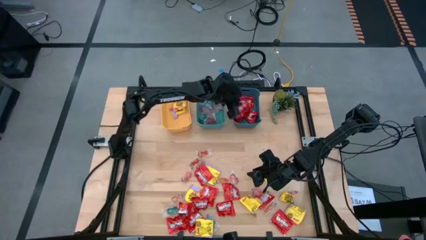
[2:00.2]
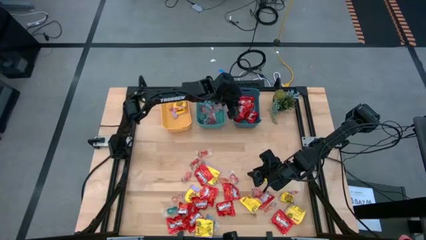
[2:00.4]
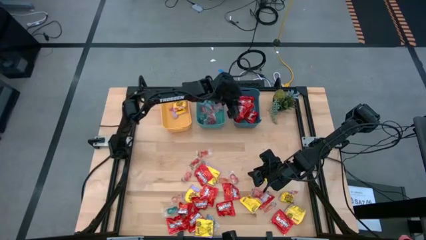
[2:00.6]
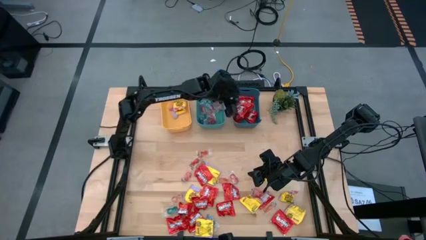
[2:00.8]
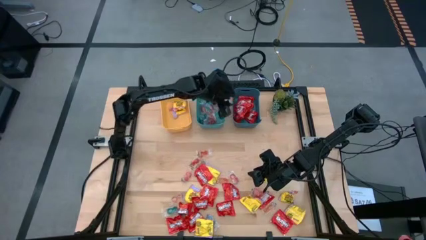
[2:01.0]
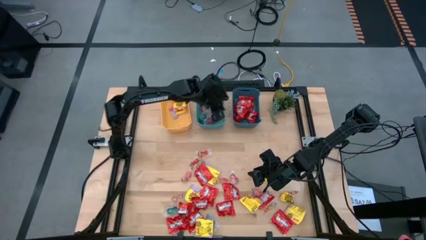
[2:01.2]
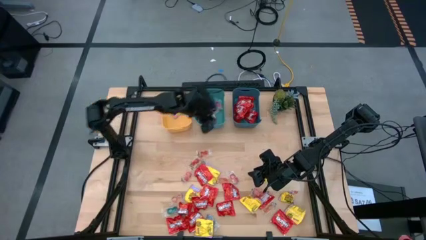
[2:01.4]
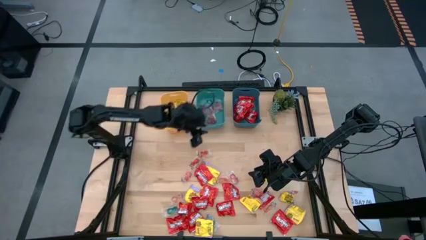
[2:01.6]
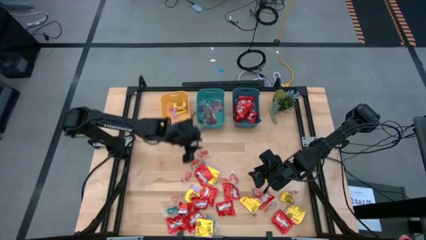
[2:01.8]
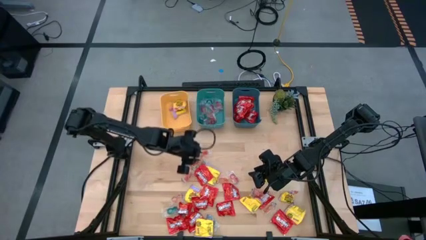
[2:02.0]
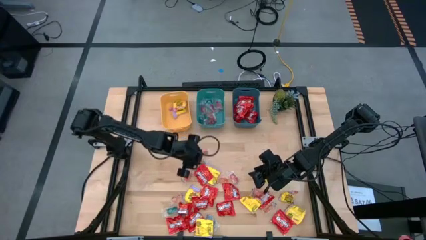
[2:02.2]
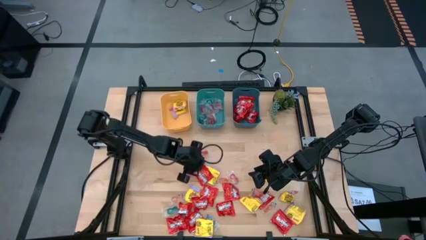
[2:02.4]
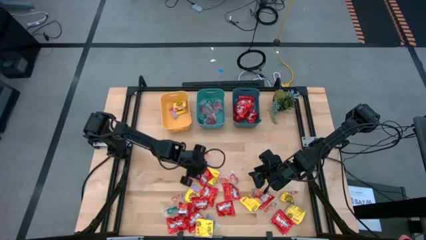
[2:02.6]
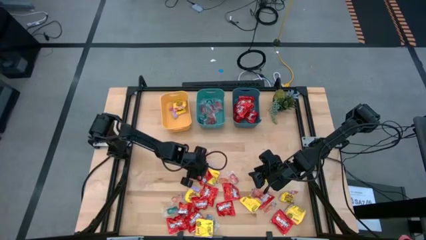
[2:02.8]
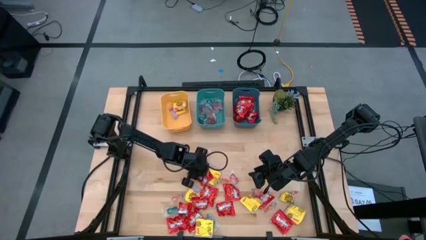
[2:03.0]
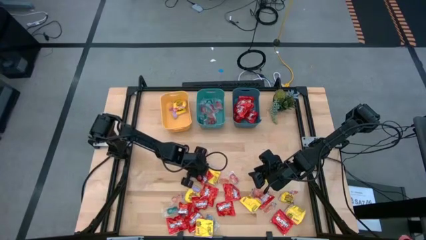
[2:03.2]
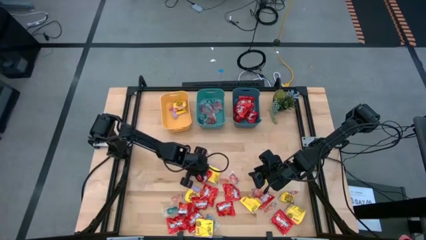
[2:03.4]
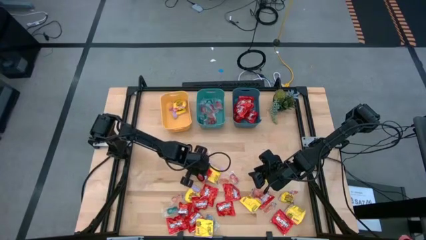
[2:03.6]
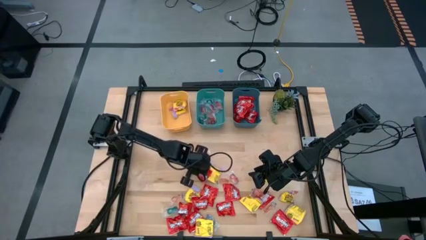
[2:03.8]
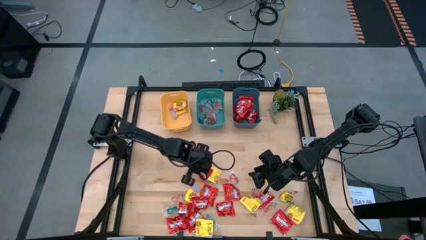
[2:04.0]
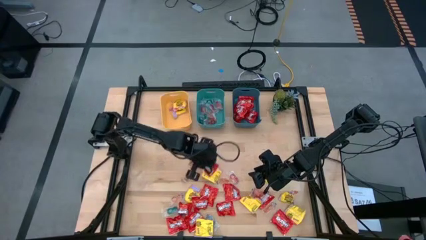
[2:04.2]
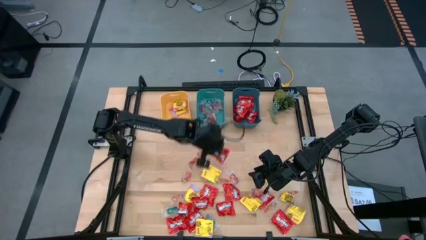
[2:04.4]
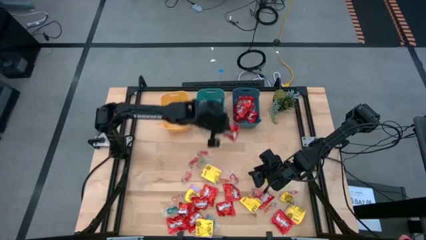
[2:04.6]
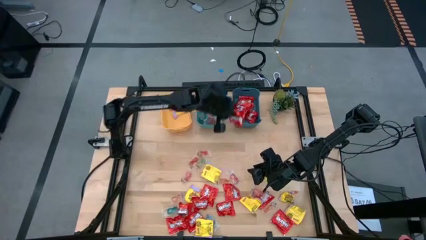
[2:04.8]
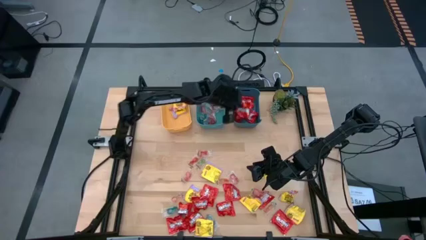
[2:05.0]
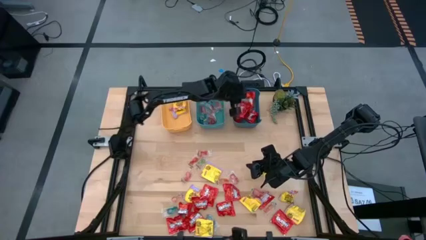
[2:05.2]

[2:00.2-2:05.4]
Task: Sort candy
Put the red candy into the blue bin

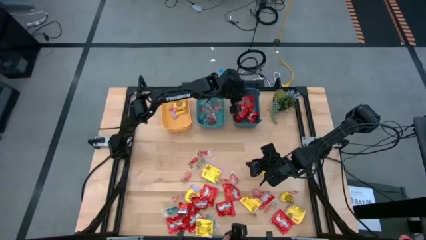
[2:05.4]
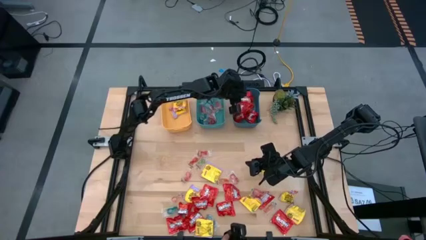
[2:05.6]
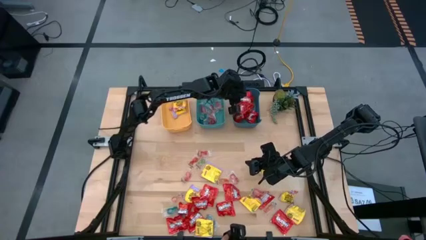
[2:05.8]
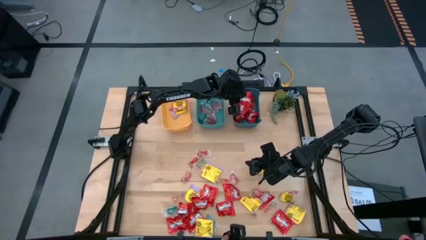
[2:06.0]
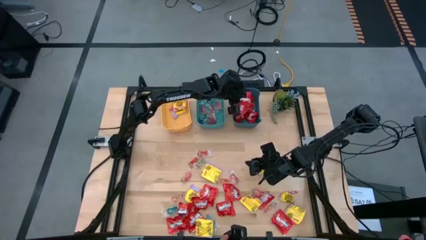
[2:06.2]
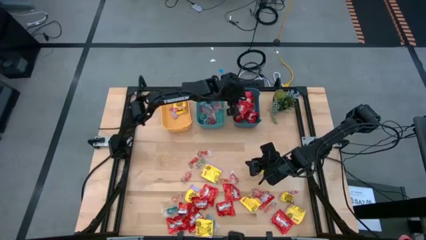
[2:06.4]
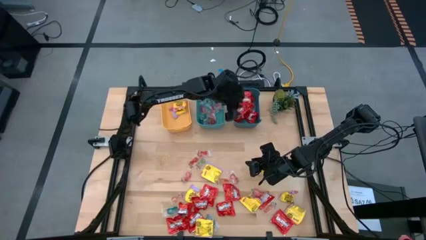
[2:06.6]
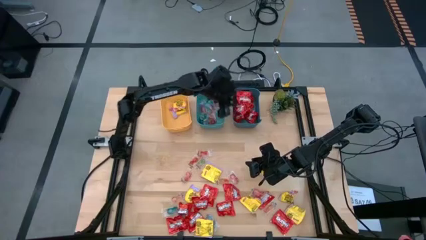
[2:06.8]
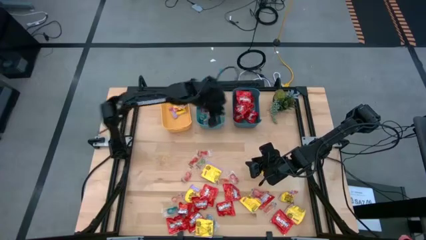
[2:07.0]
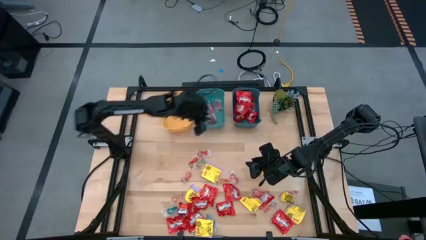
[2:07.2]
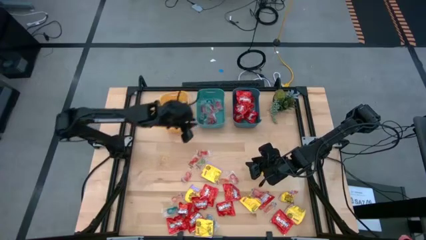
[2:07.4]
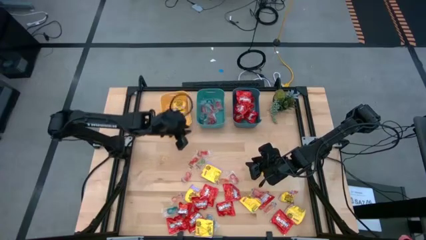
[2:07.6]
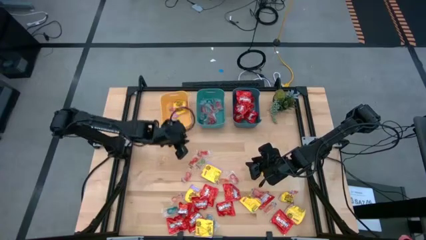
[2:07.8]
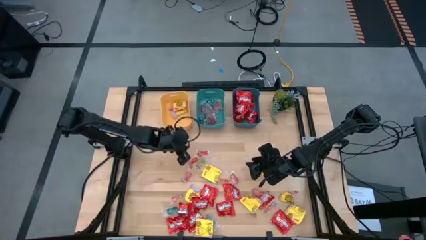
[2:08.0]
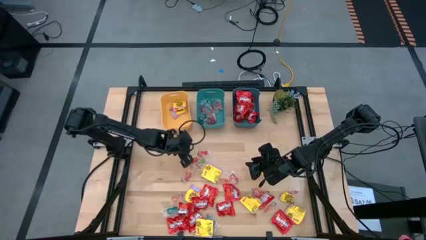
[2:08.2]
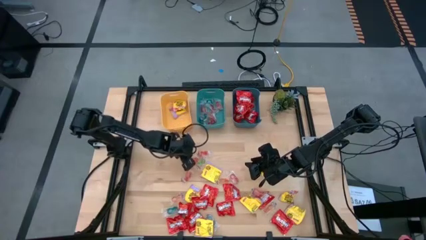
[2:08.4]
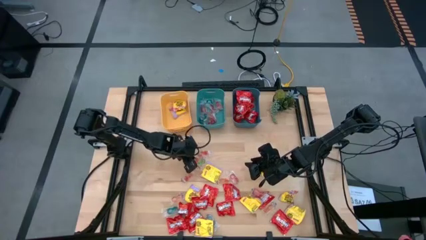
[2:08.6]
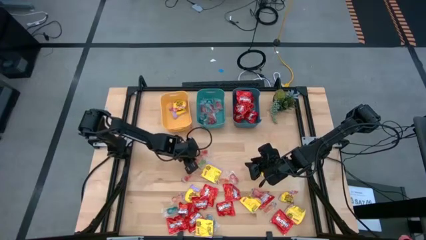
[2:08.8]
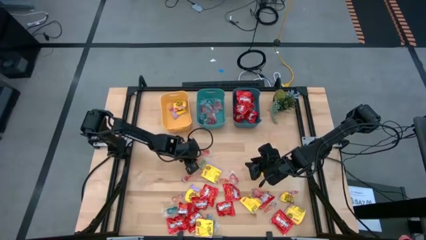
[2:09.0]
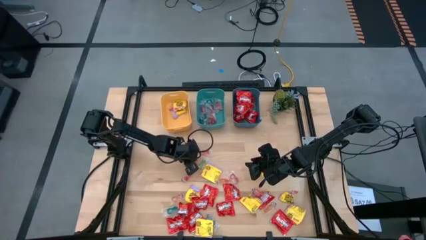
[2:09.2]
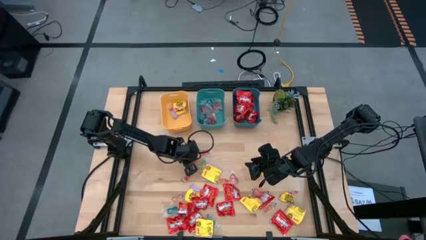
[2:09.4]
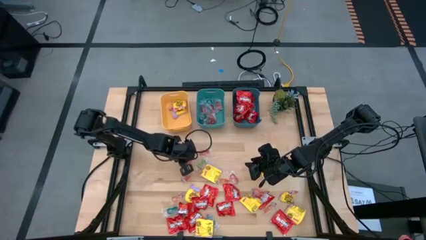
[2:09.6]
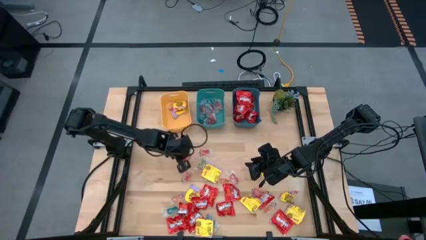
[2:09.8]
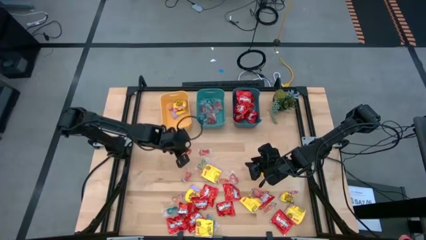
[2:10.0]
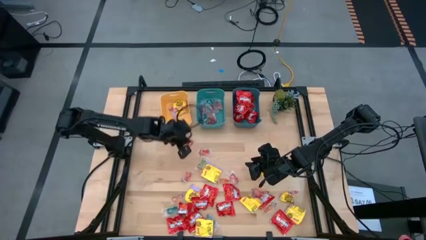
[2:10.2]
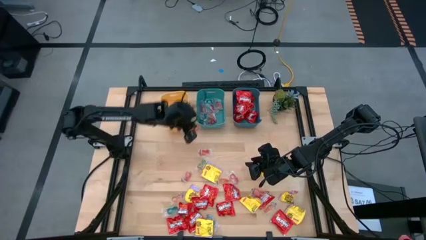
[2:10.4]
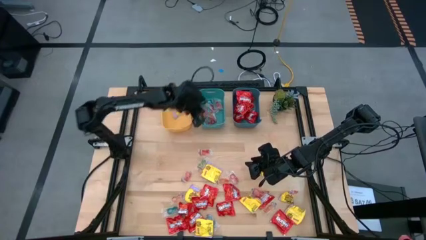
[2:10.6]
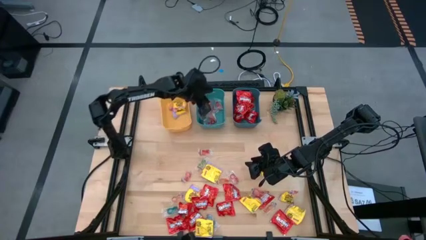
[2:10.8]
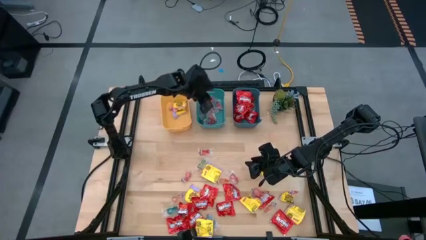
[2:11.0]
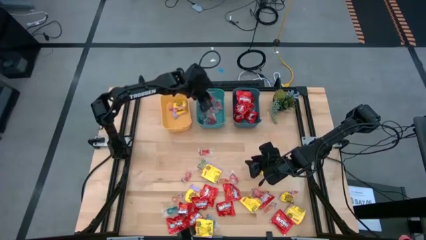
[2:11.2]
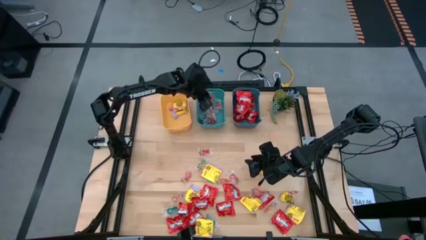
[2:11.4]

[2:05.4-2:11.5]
Put the orange gummy candy into the green bin

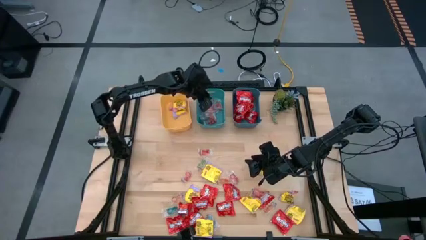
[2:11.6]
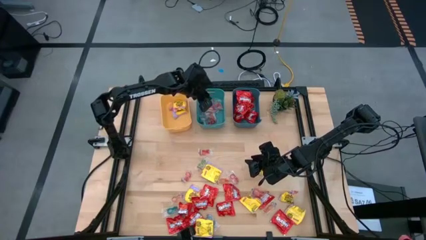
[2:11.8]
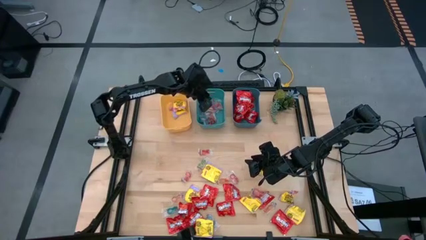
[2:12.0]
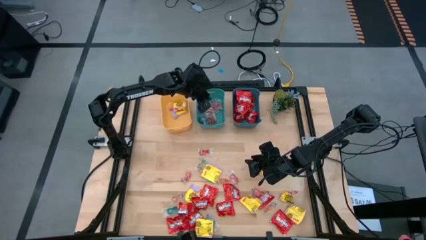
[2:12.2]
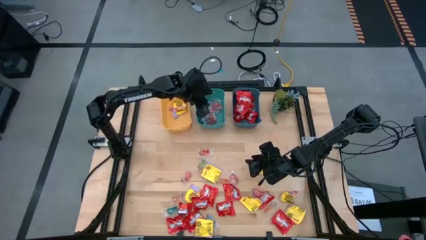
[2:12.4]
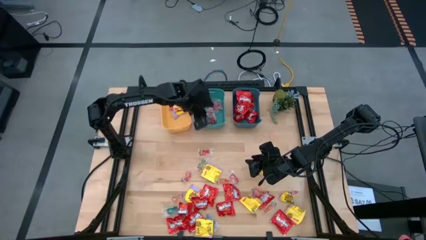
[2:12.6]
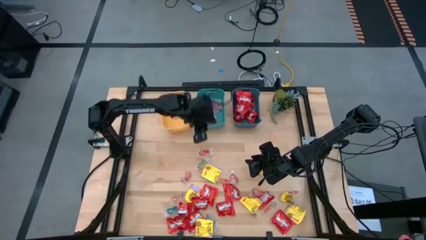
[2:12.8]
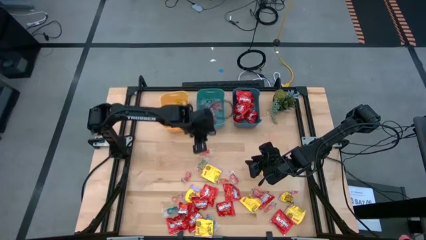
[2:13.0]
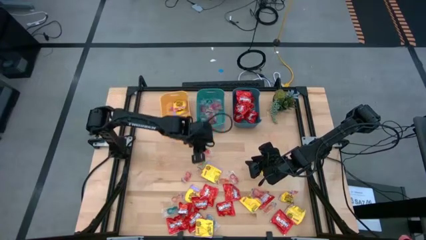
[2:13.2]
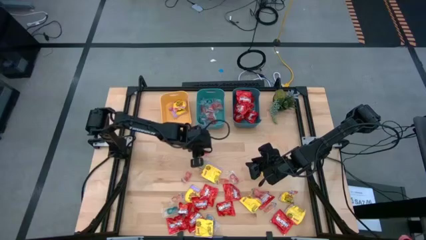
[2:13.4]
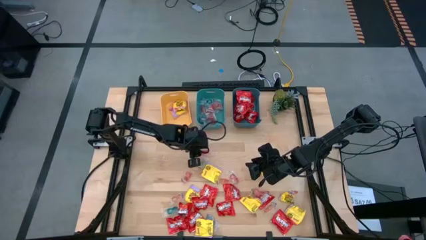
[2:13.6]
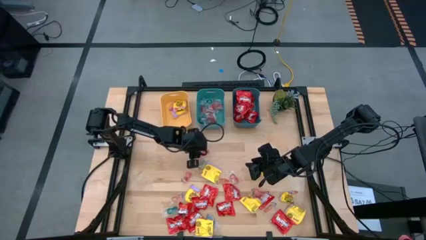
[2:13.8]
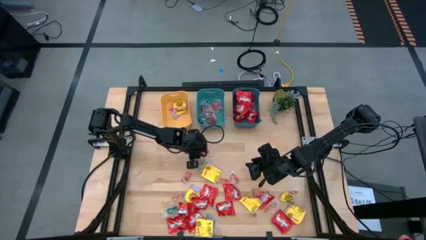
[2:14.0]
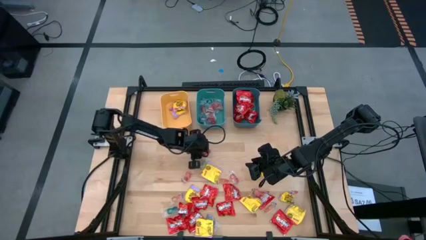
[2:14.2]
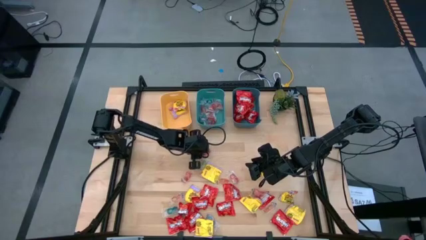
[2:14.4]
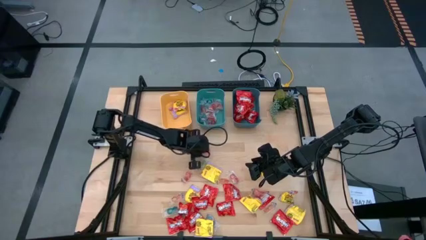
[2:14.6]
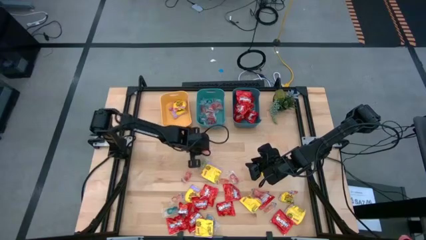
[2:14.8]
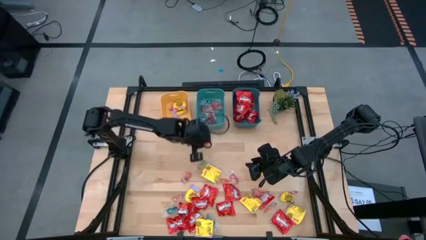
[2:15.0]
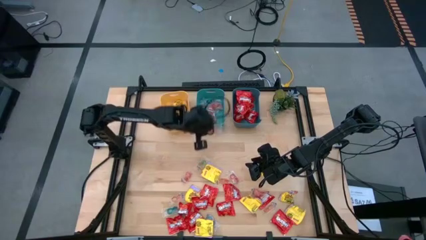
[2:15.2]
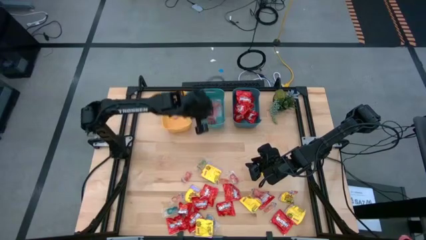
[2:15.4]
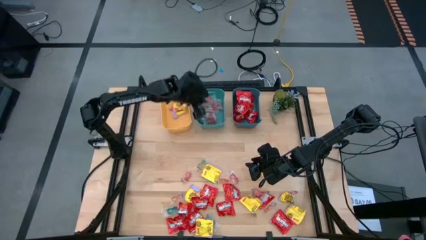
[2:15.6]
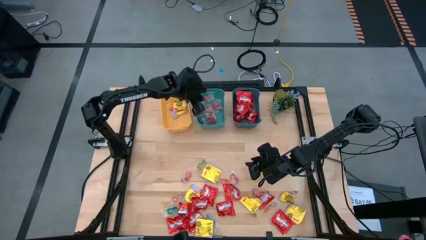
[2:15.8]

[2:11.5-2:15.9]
Put the orange gummy candy into the green bin
